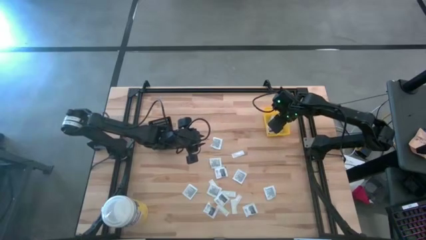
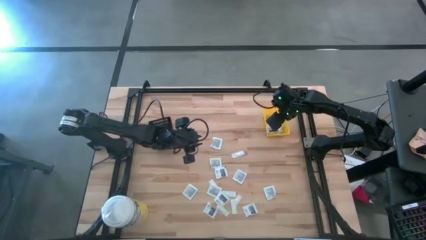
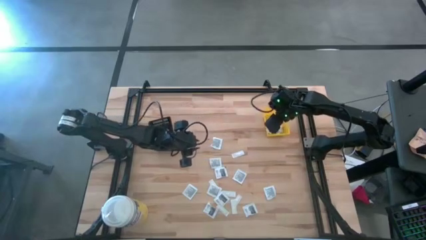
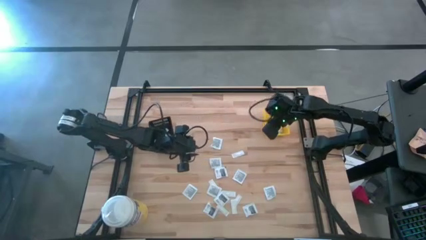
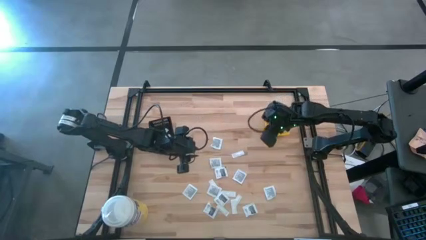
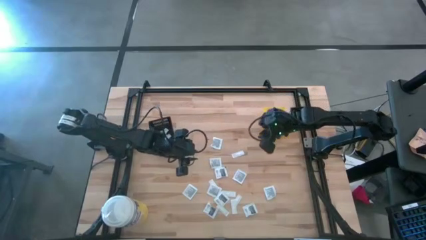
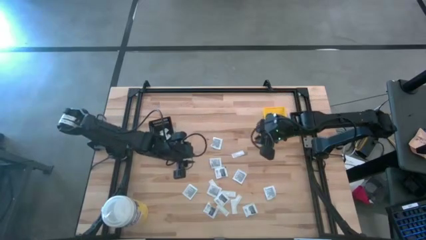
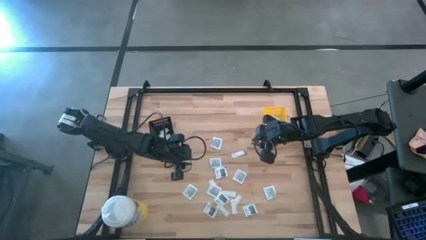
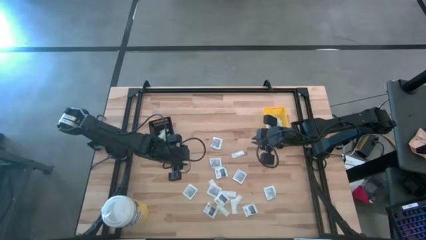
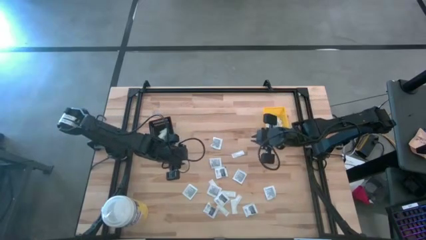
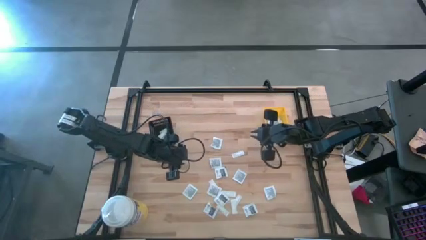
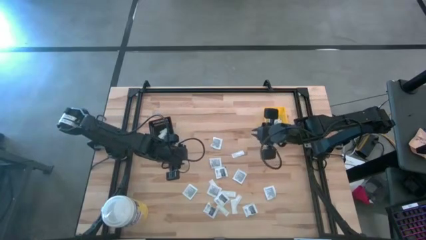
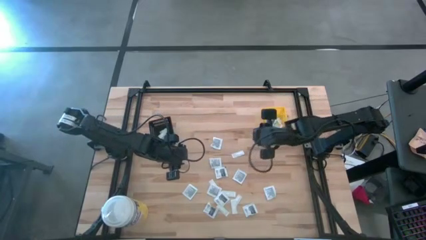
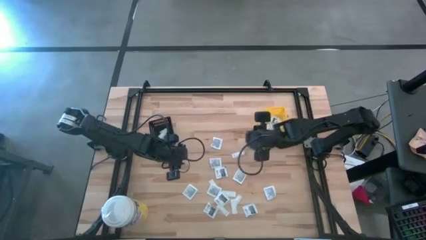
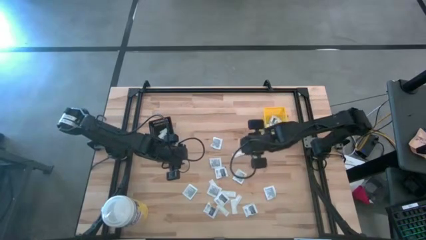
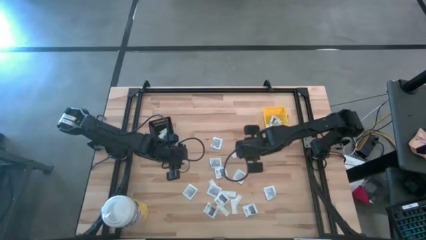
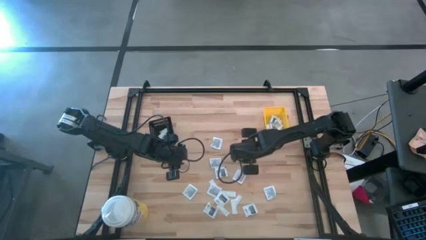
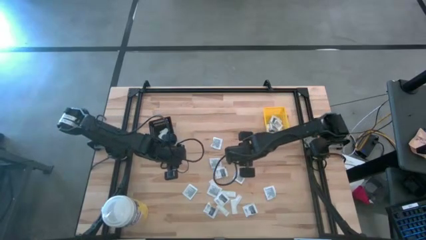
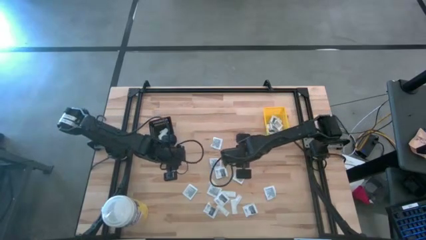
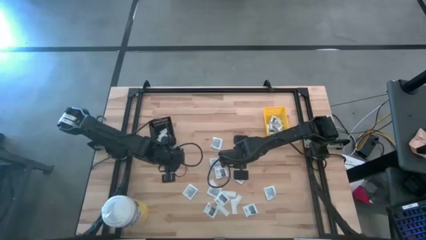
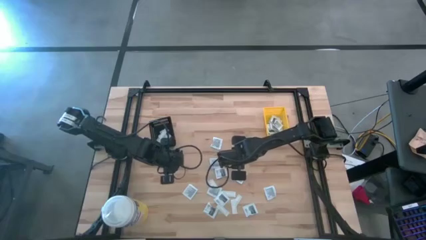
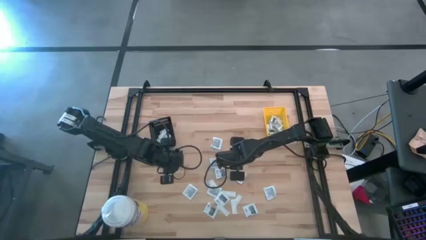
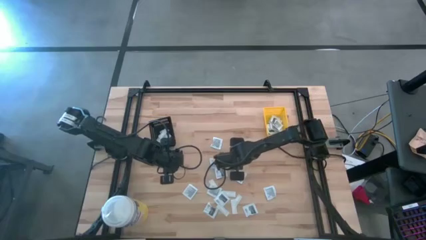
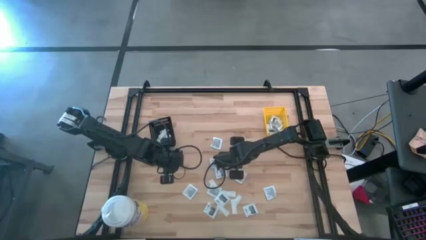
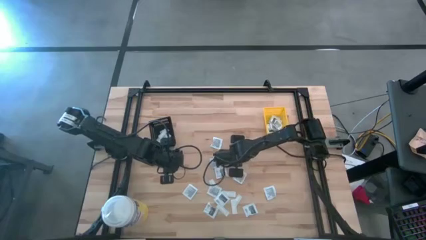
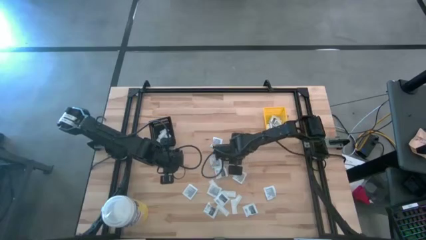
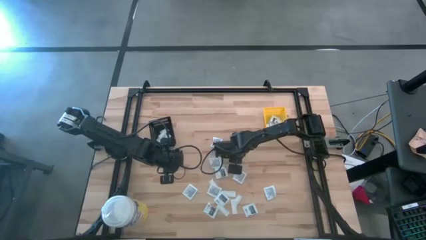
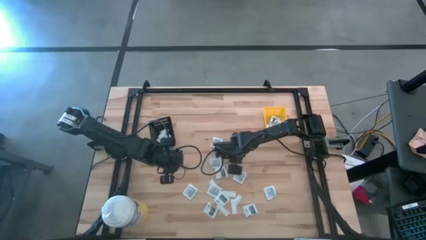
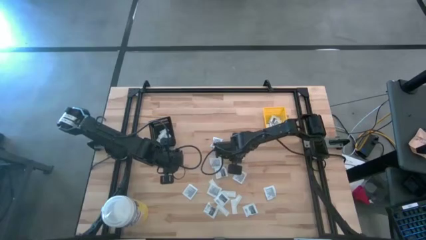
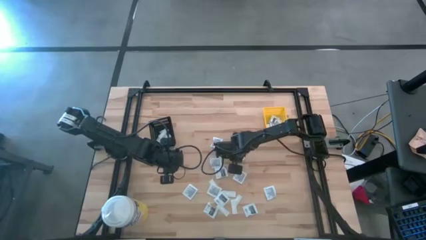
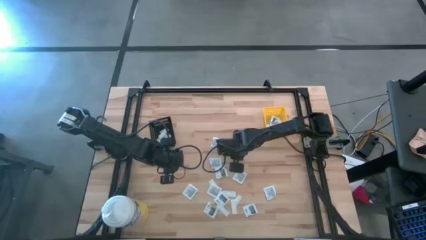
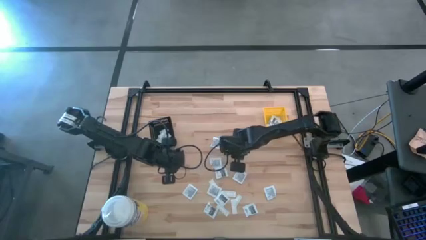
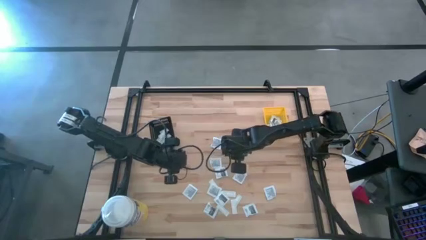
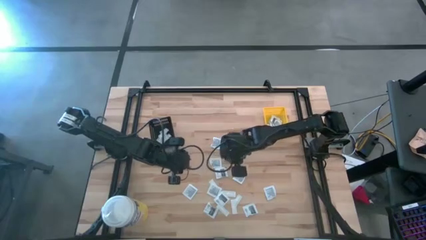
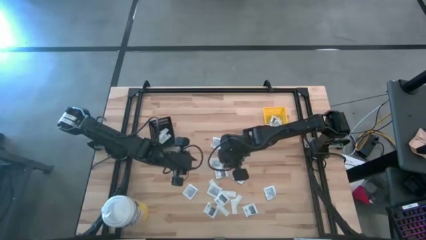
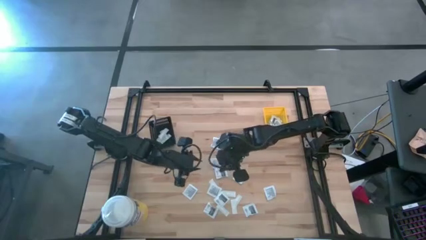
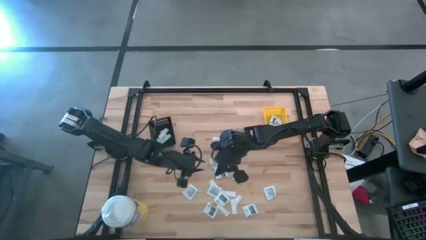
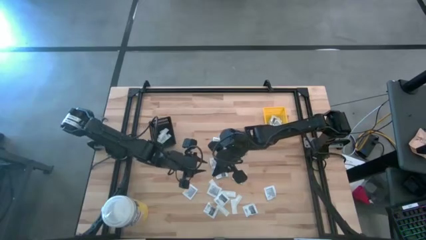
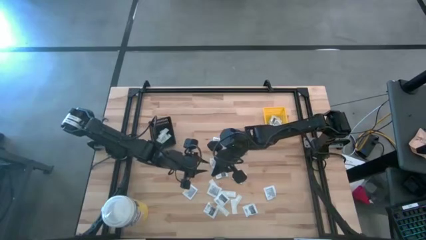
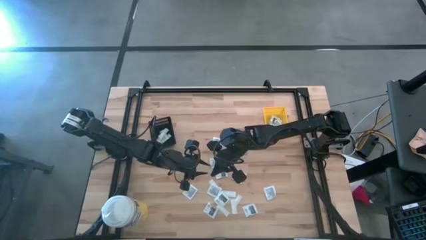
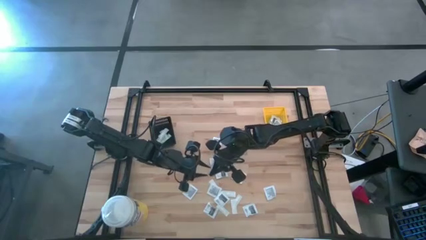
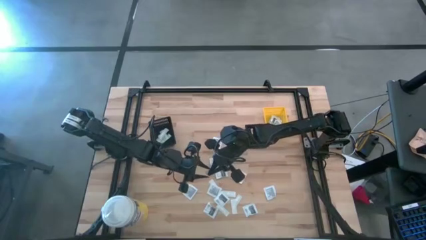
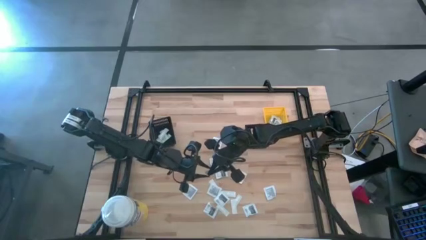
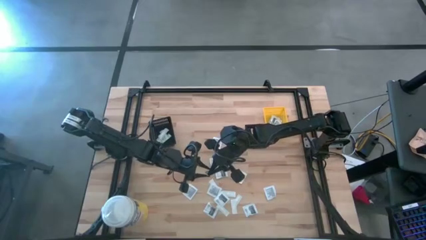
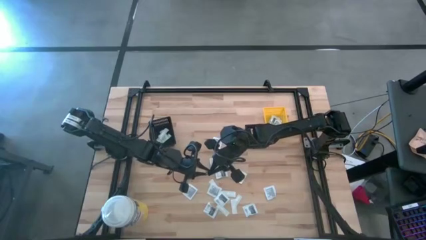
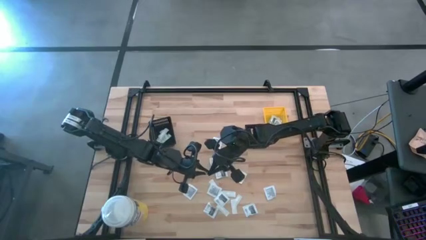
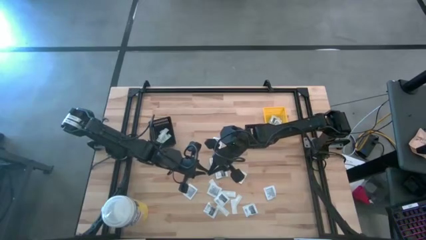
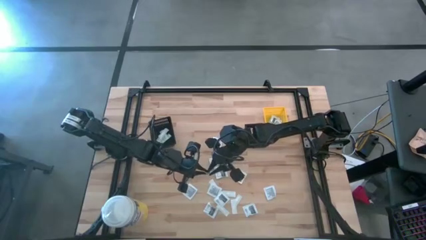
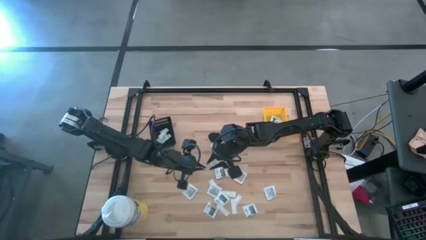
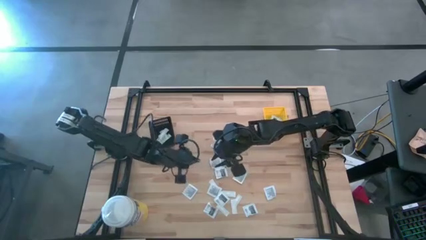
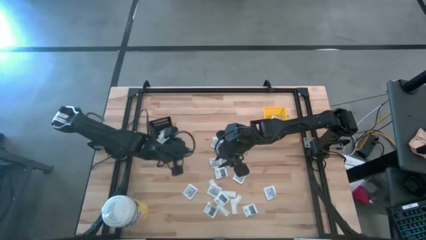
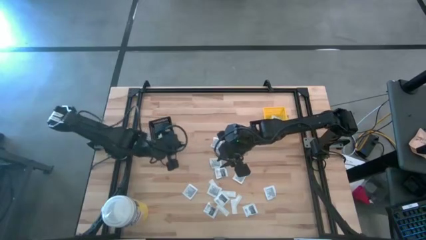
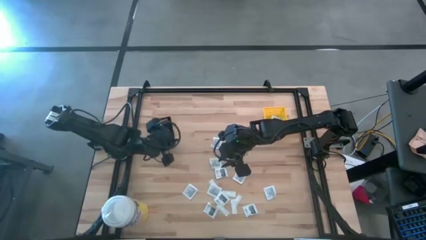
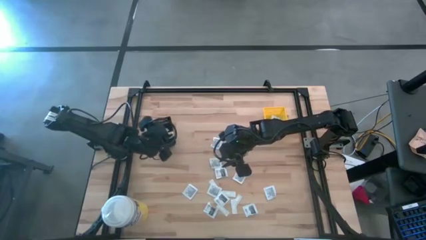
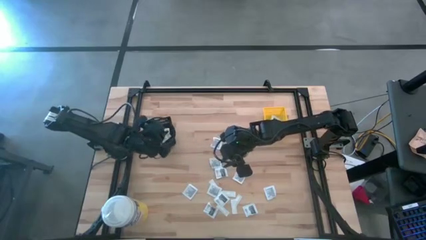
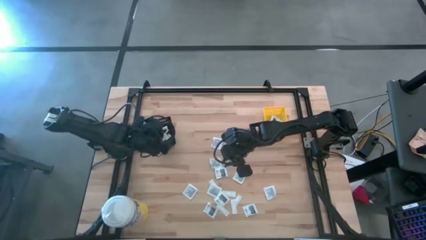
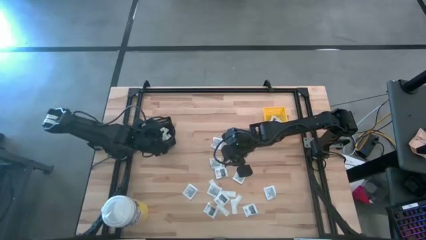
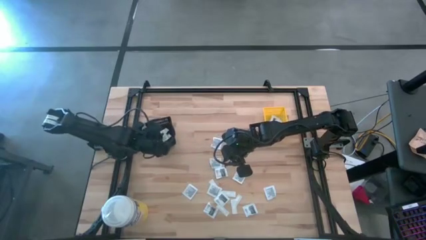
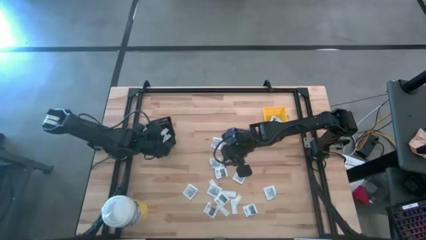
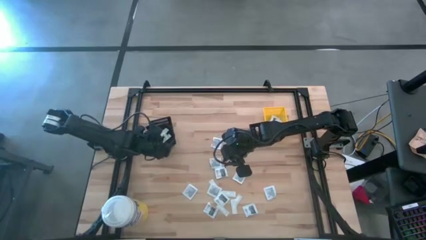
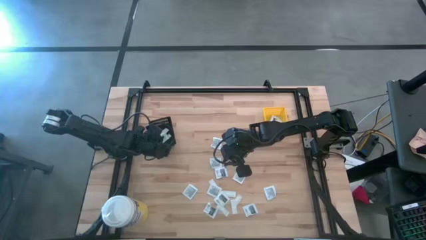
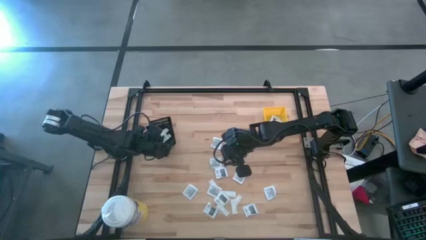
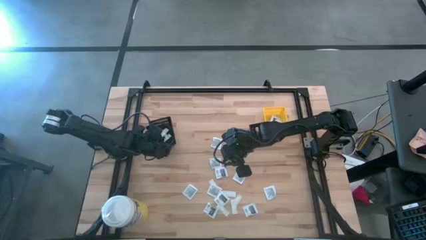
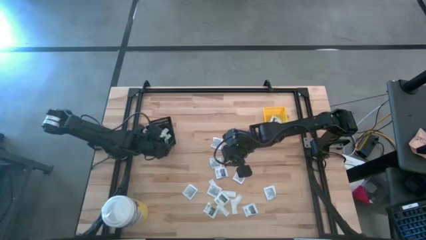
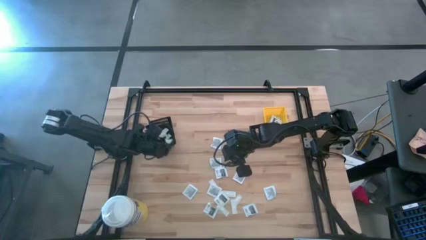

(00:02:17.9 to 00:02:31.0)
Task: Pick & Place First Aid Supplies
Put the green bandage into the black bin
